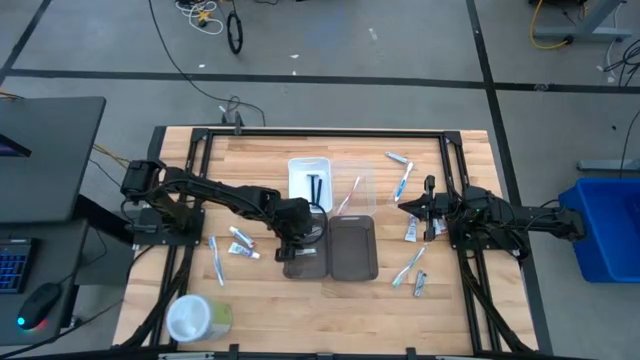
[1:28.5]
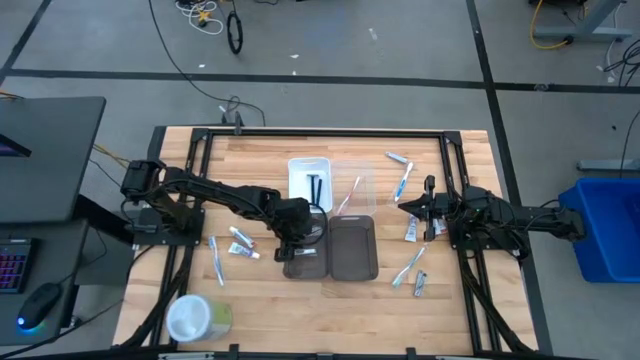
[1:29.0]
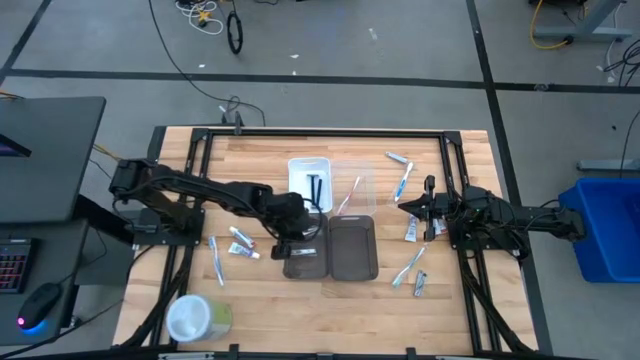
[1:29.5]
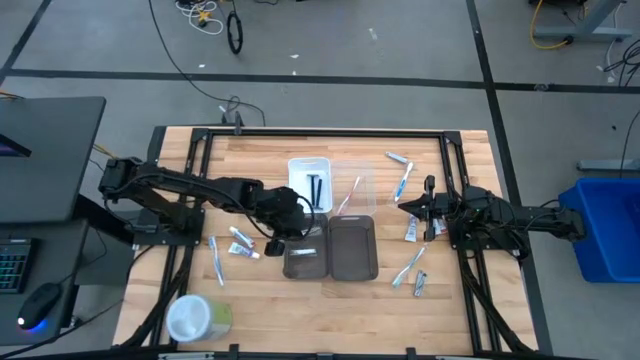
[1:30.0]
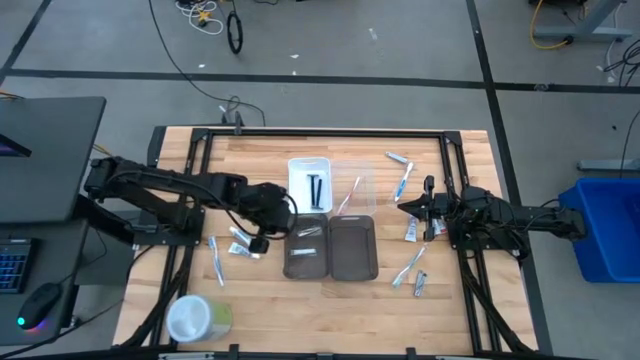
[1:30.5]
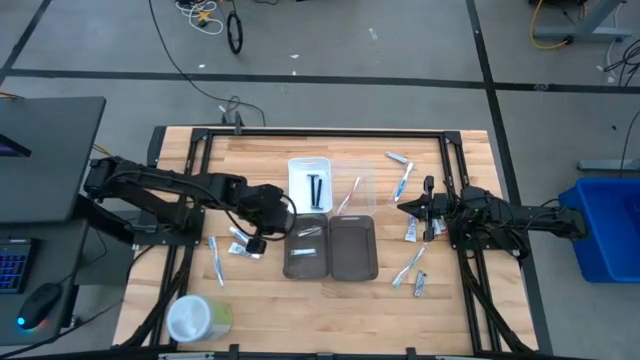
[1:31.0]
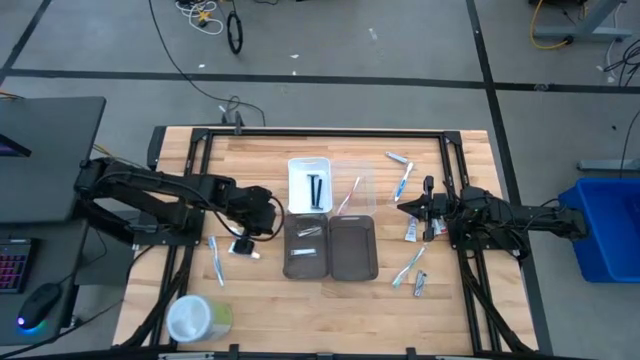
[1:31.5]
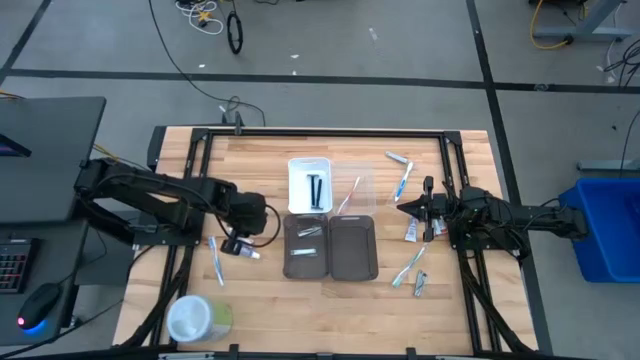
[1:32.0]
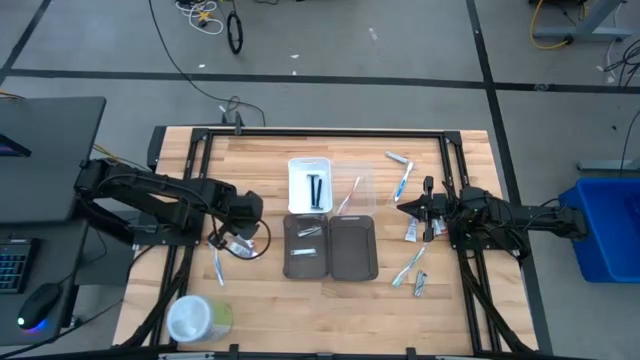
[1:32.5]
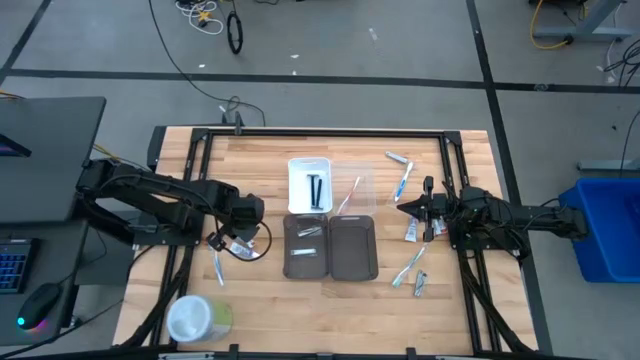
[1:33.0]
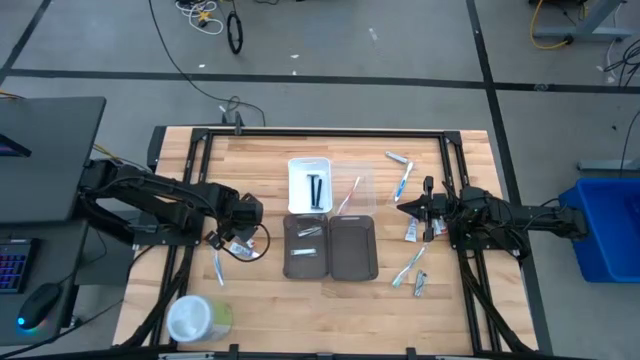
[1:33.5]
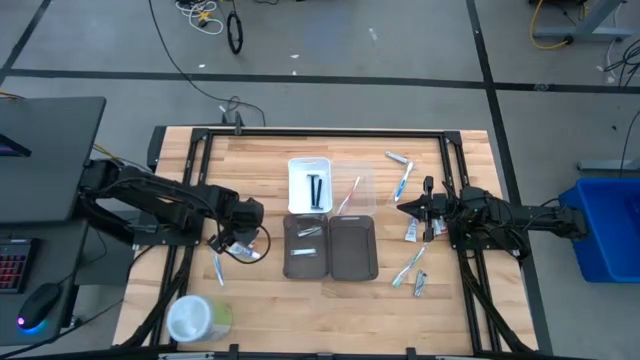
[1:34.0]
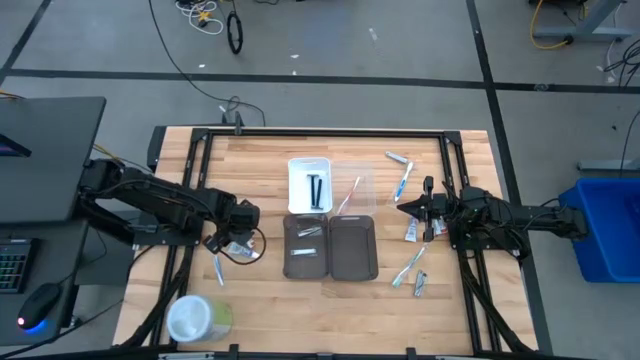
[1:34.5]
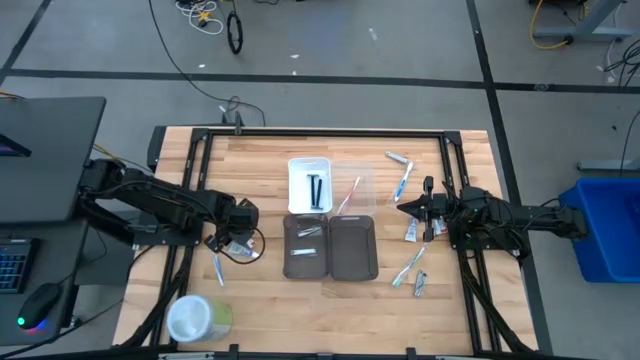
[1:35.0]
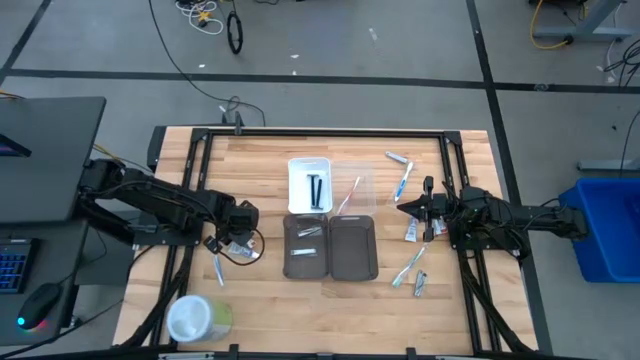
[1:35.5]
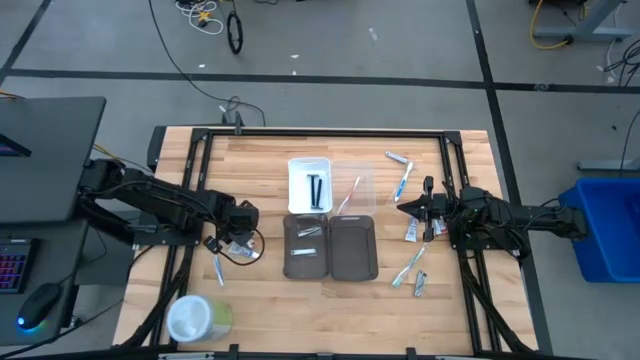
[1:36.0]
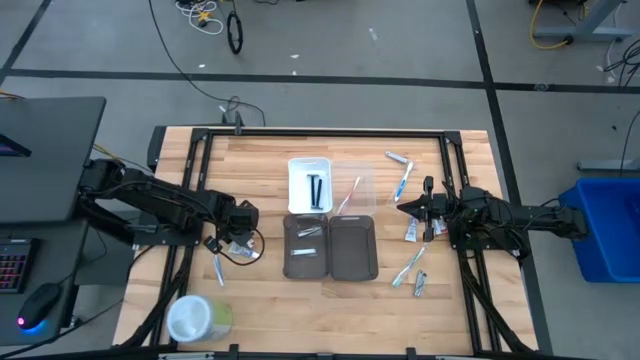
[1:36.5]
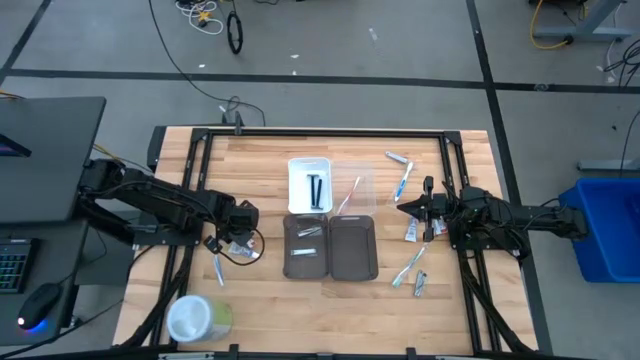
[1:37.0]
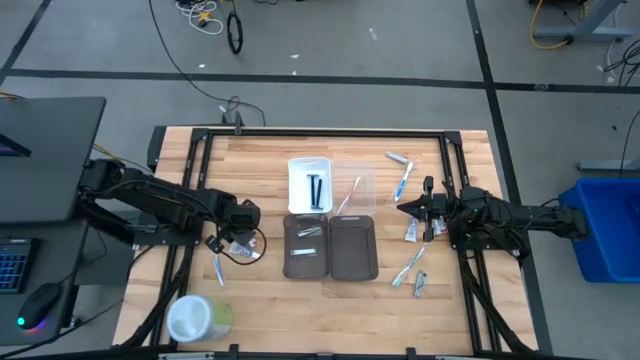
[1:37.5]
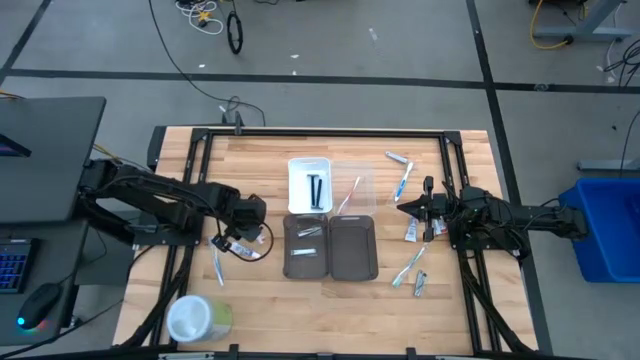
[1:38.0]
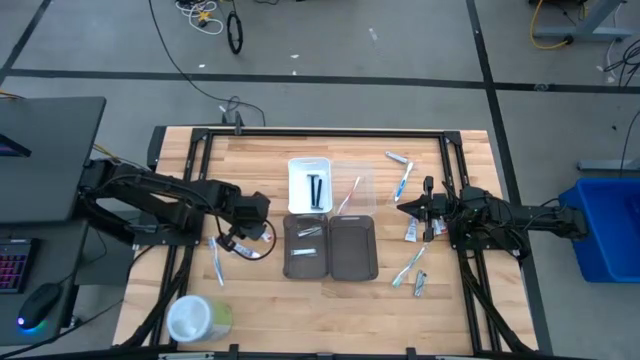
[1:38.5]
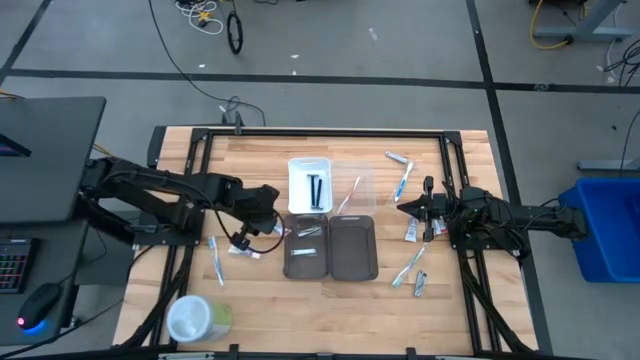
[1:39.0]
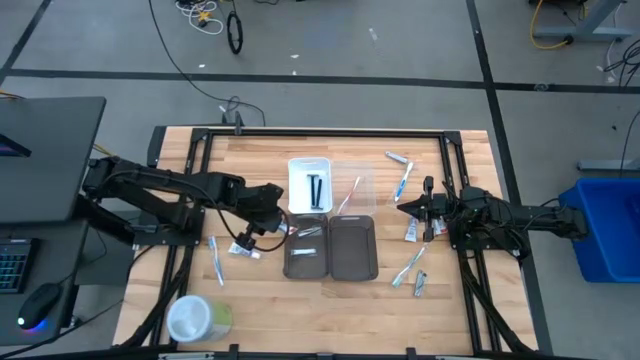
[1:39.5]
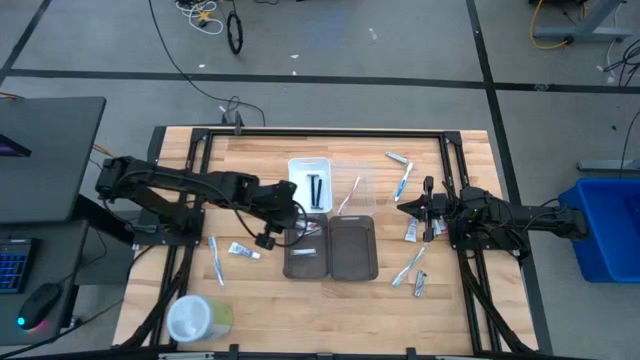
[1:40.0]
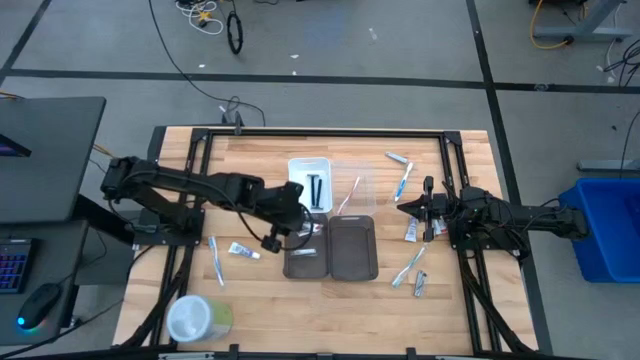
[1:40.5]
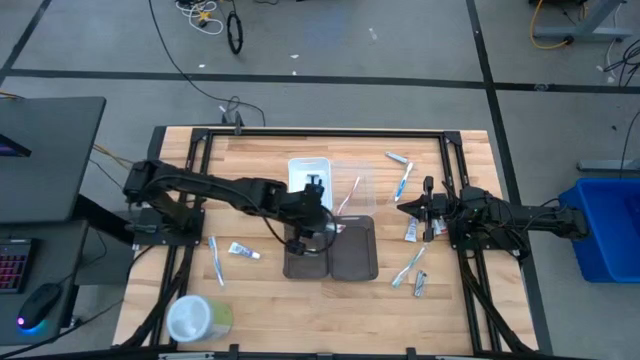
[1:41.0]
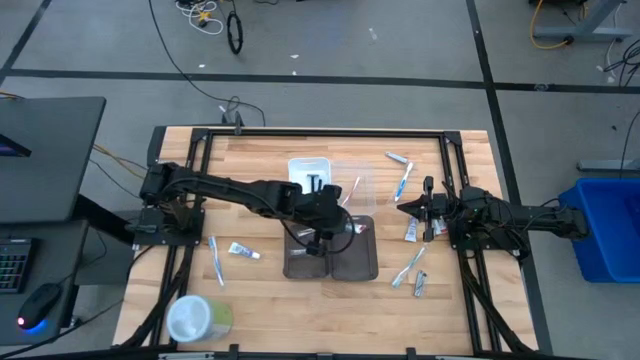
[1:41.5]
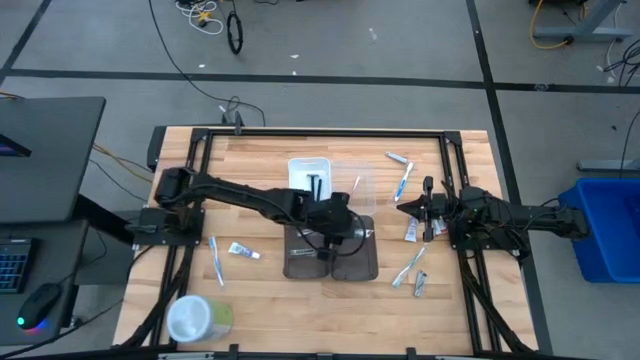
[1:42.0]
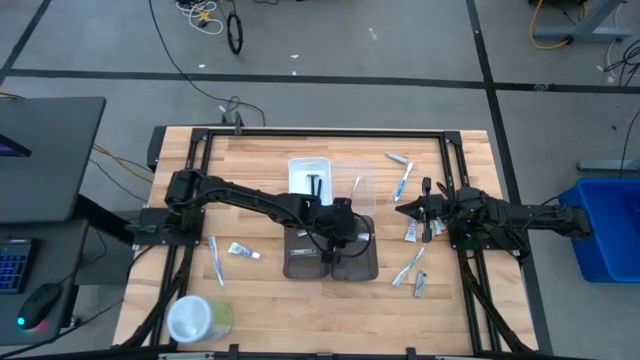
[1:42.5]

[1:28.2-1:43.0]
Task: Pick & Place Travel size toiletries
Put the white toothpaste into the right black bin

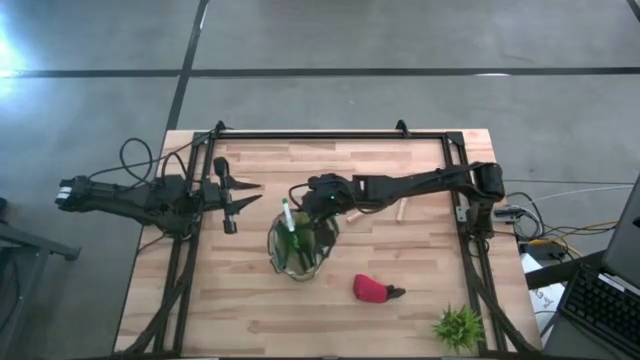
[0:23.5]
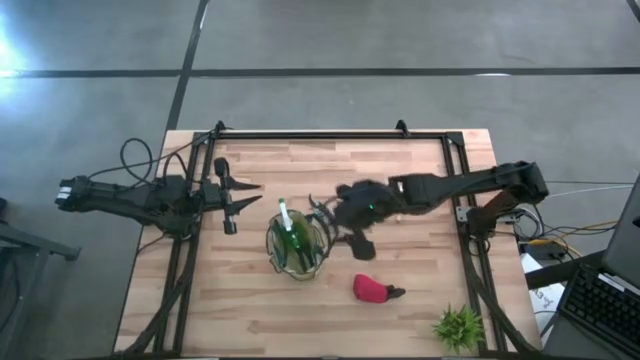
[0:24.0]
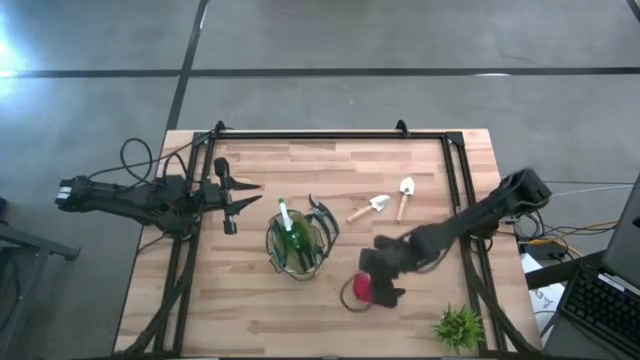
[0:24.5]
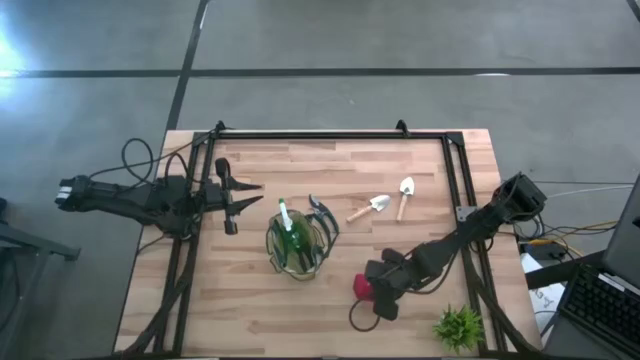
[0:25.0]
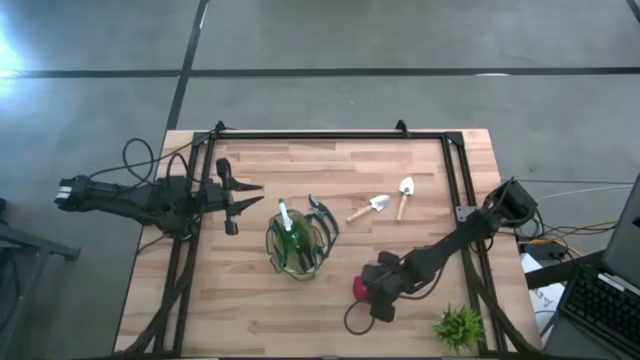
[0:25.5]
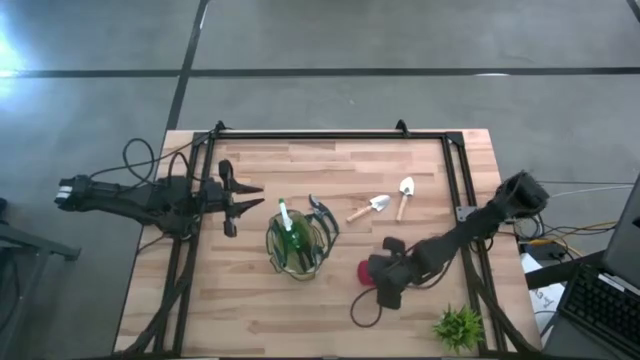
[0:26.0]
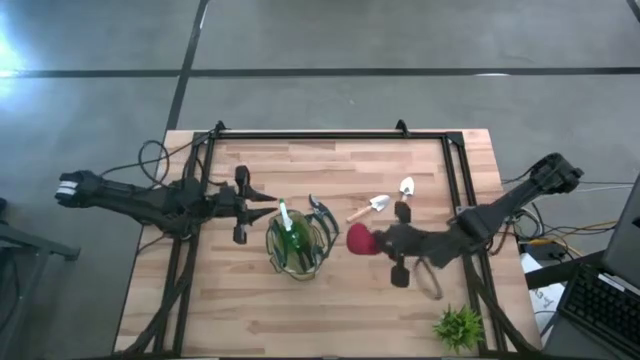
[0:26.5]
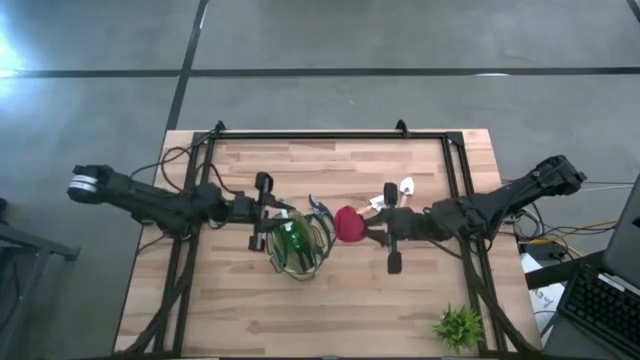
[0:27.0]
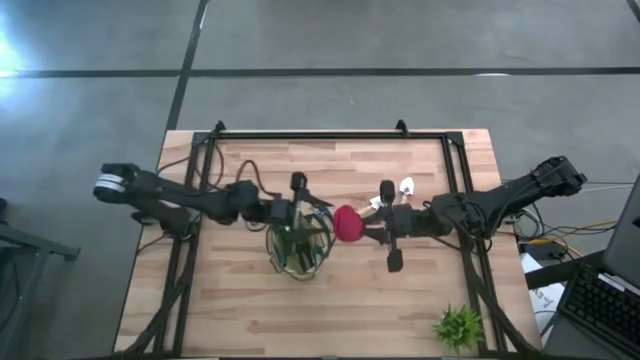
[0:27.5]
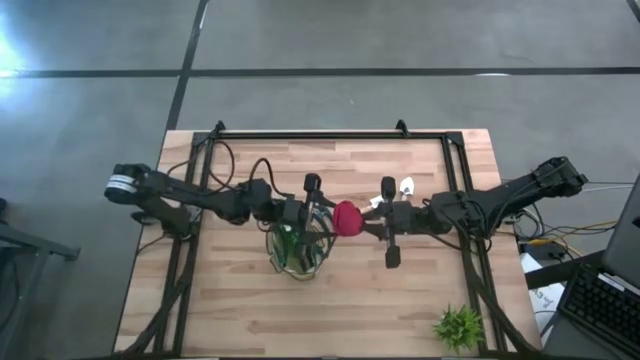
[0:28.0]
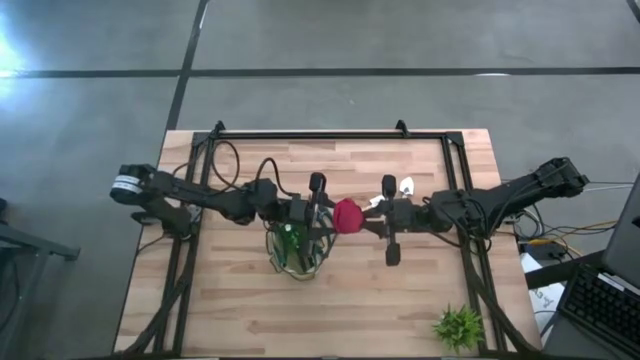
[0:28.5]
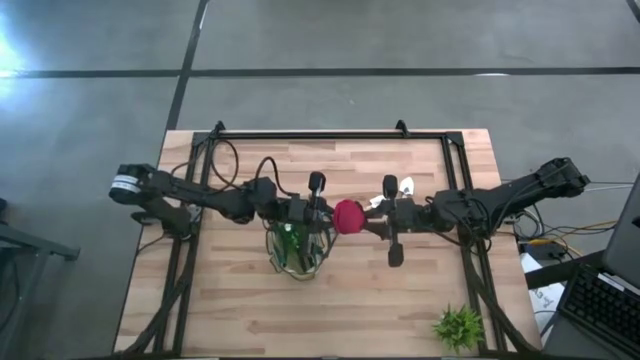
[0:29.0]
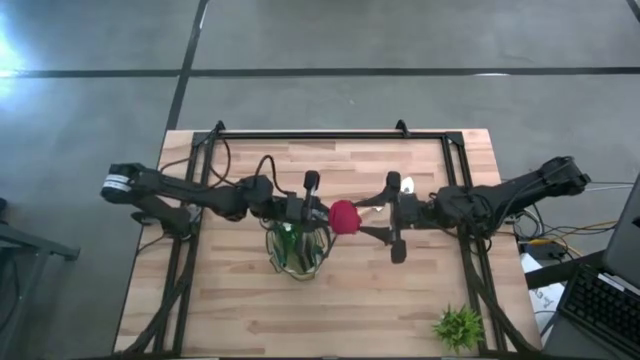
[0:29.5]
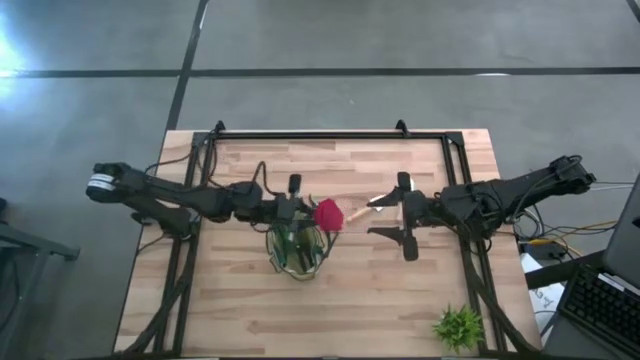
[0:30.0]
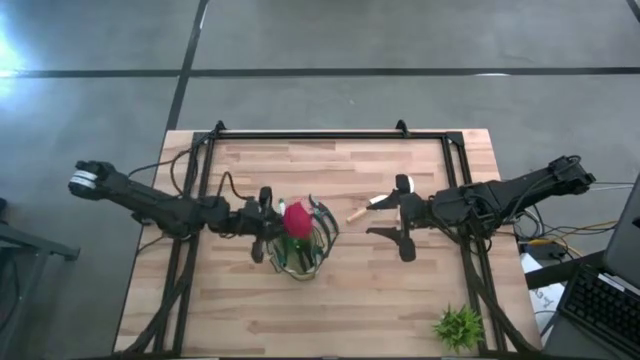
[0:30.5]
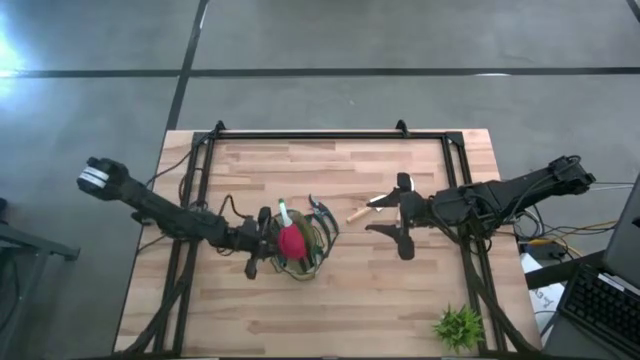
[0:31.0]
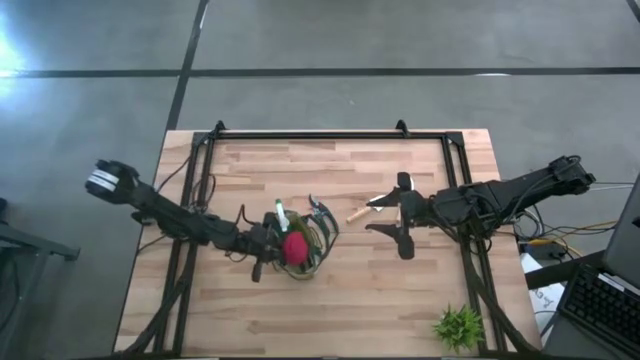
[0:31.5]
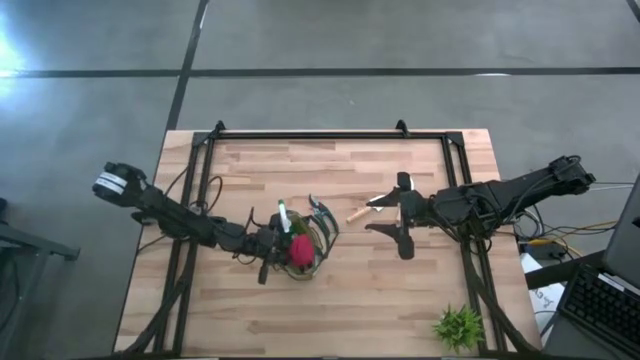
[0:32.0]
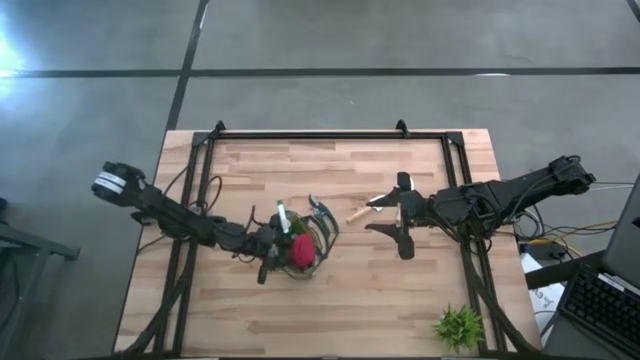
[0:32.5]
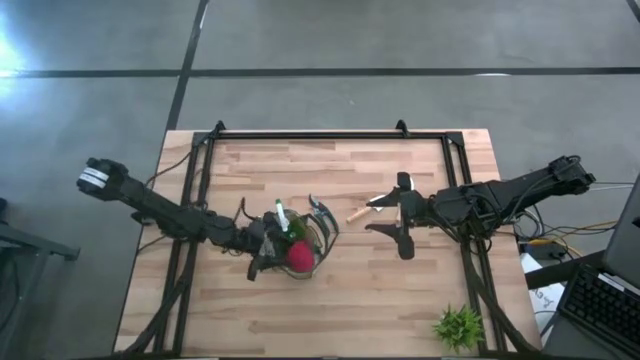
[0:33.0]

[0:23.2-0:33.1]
Task: Pick & Place Garden tools in Gardening bag
Put the red gloves into the gardening bag
